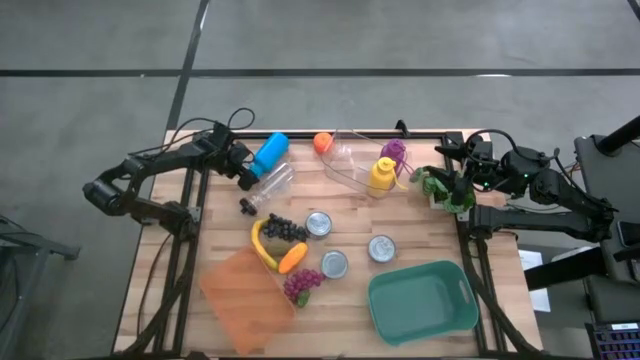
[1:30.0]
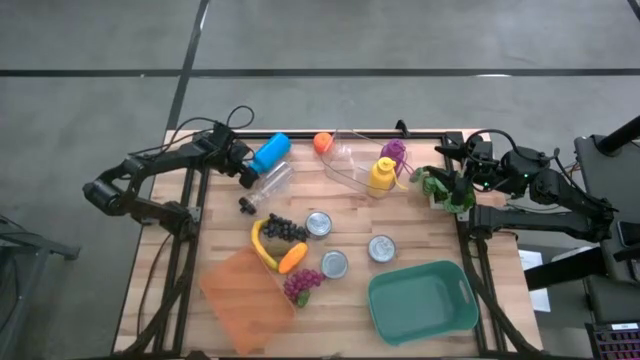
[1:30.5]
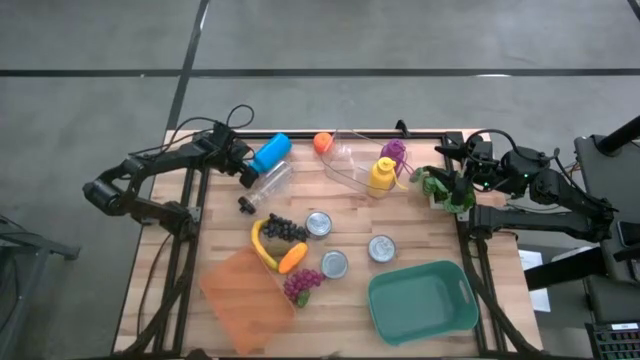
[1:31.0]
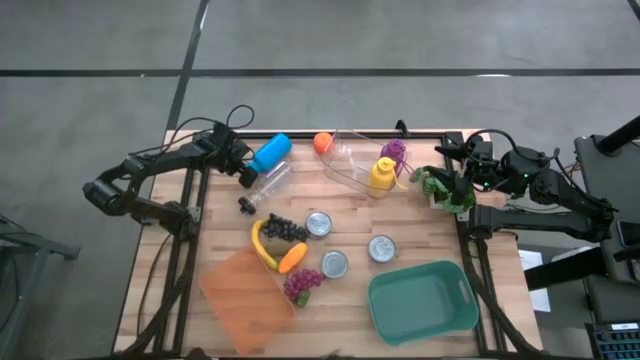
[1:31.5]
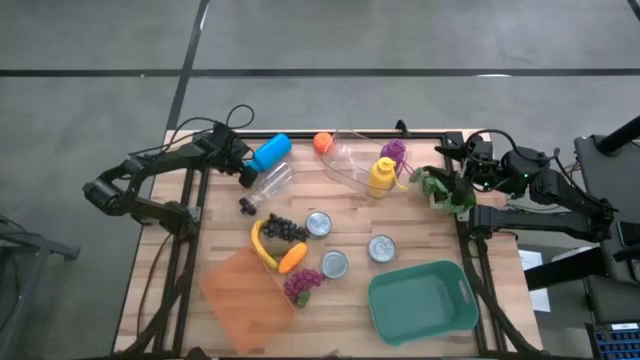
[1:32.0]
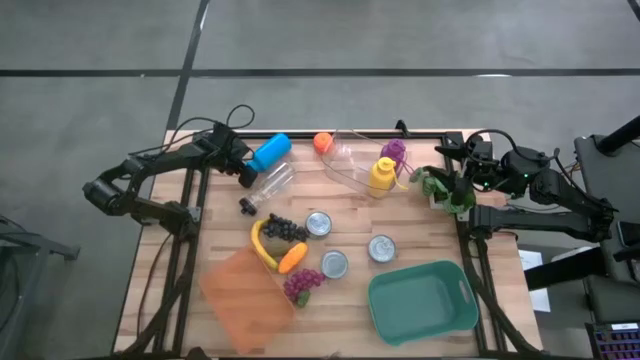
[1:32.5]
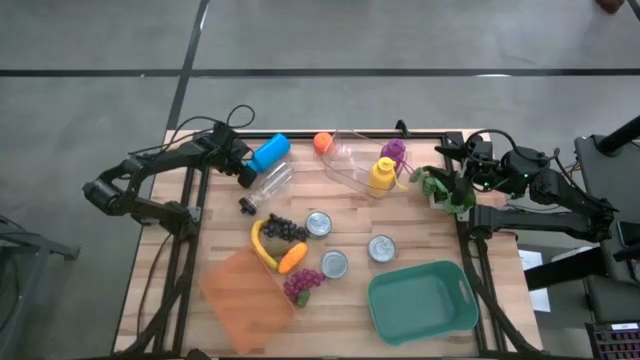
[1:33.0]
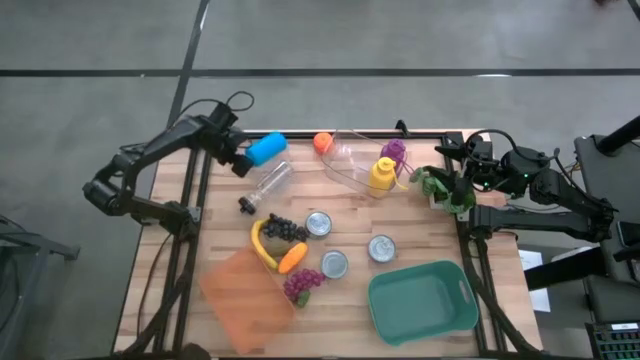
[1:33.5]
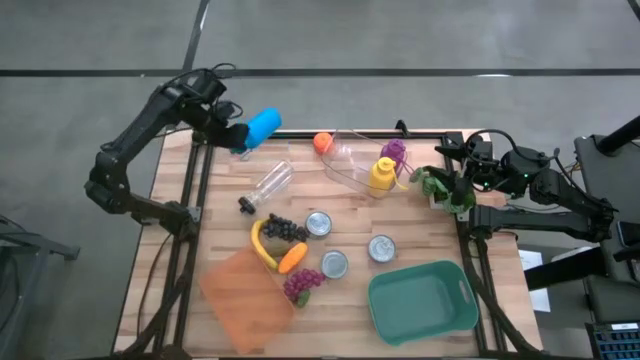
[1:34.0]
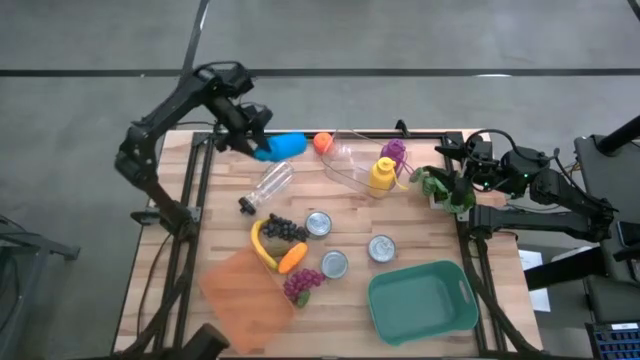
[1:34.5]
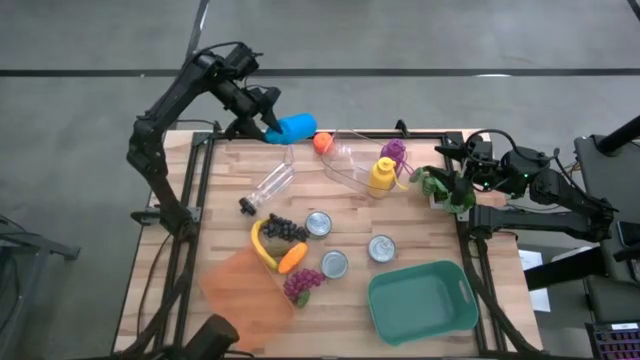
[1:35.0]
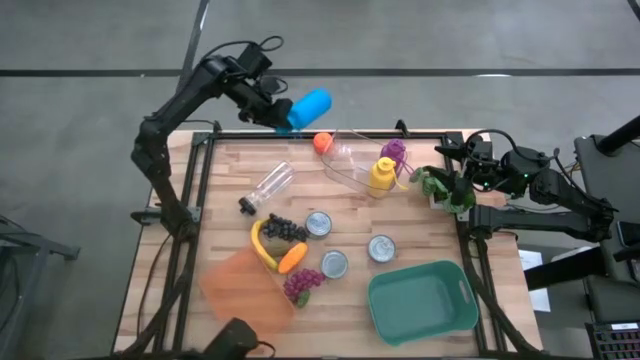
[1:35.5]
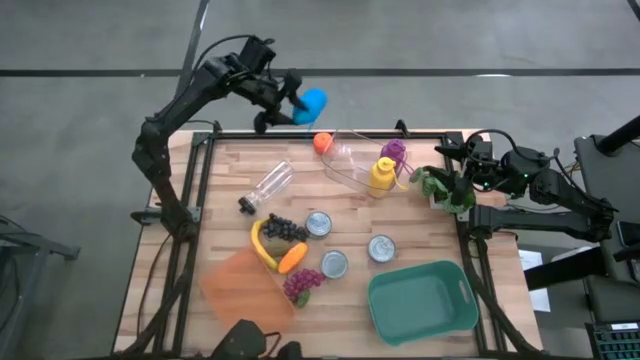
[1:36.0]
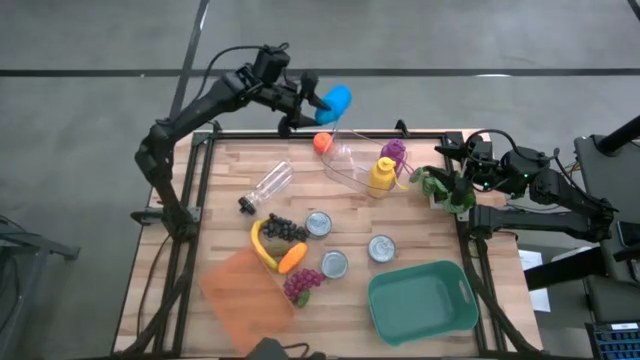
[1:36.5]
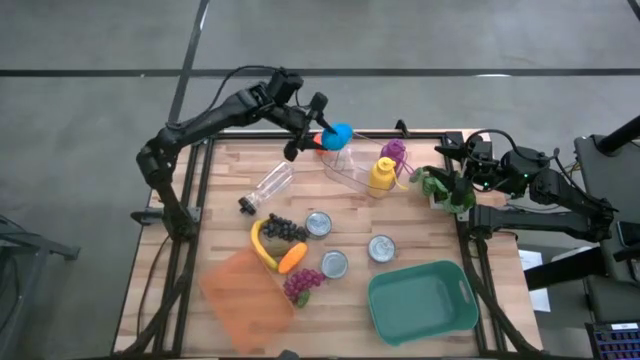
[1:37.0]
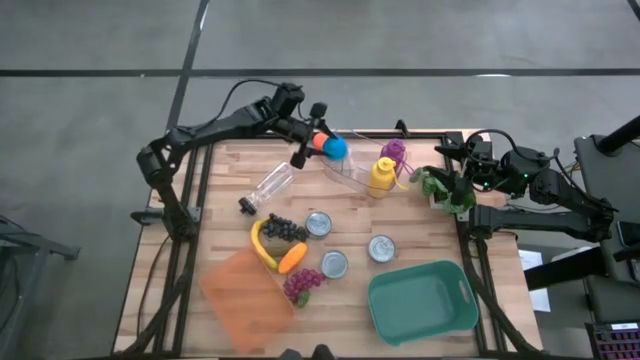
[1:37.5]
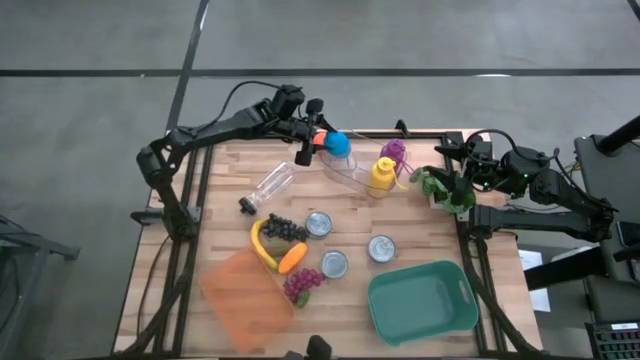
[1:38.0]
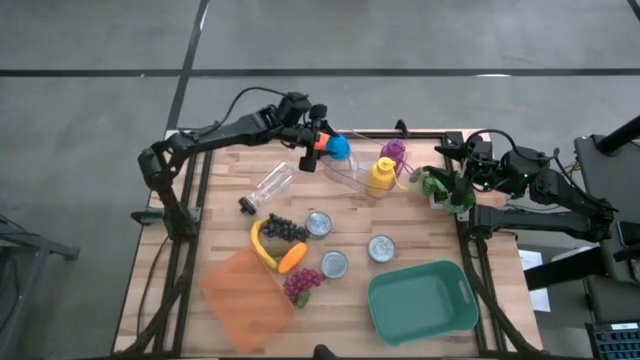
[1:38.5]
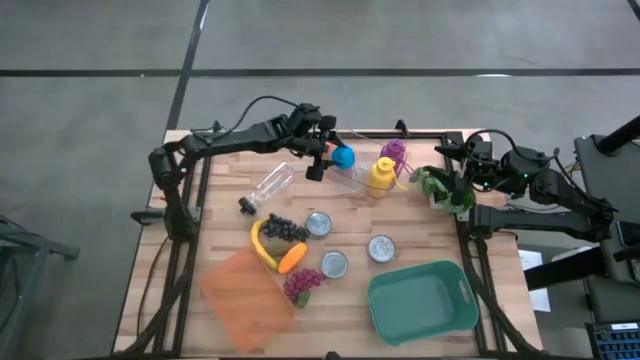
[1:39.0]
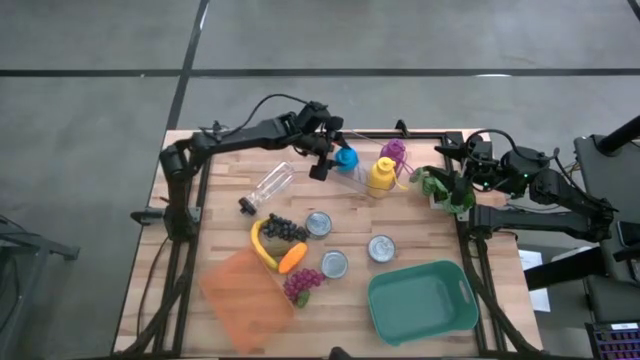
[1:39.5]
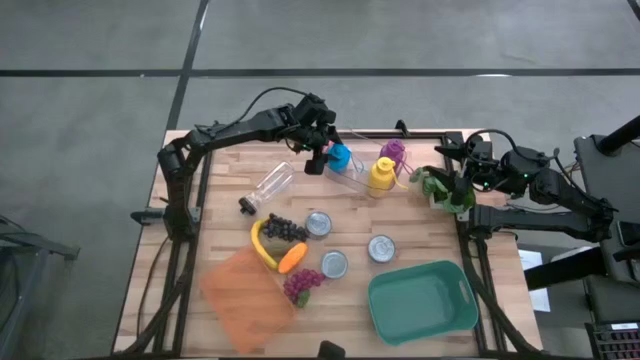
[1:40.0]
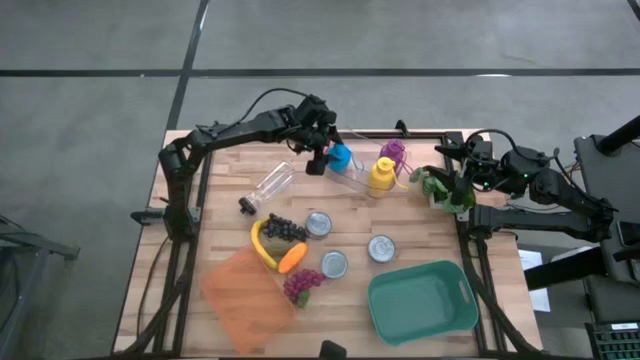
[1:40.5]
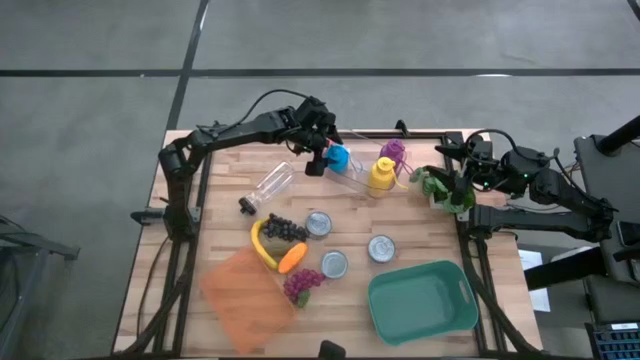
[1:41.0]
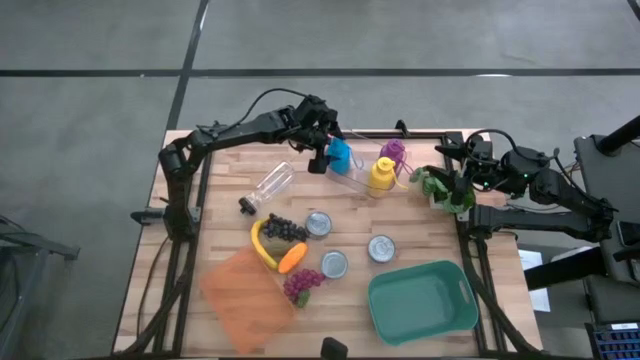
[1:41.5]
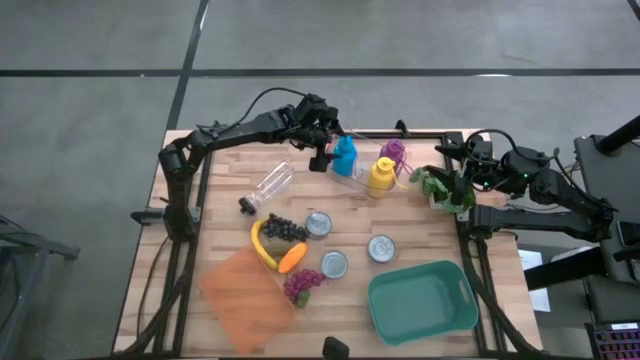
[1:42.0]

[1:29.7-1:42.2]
Task: Pick & Place Food Item
Put the blue water bottle into the transparent bin

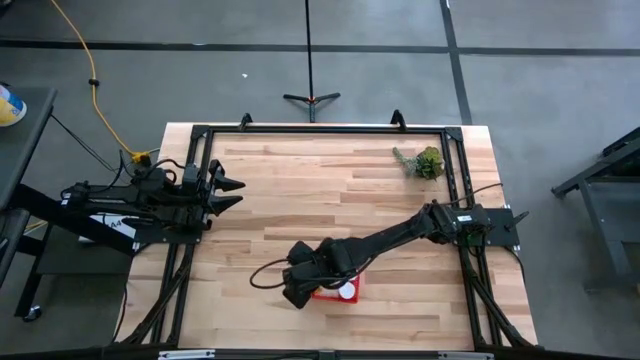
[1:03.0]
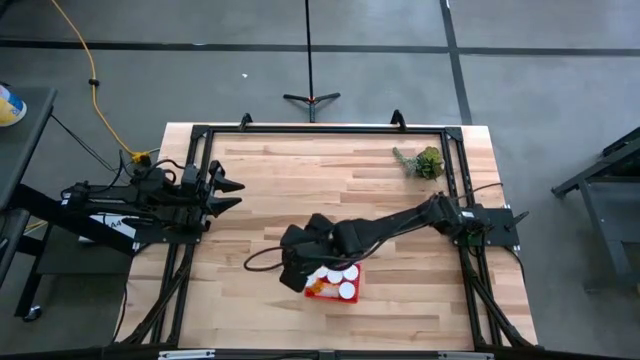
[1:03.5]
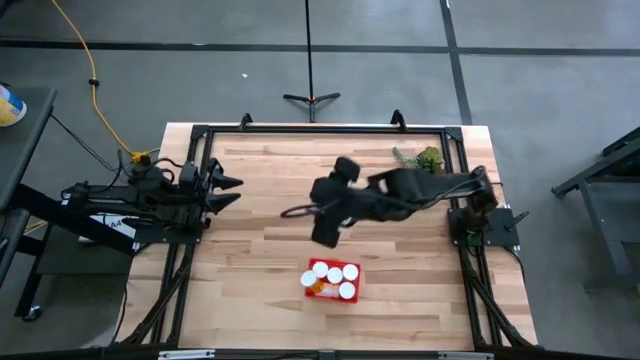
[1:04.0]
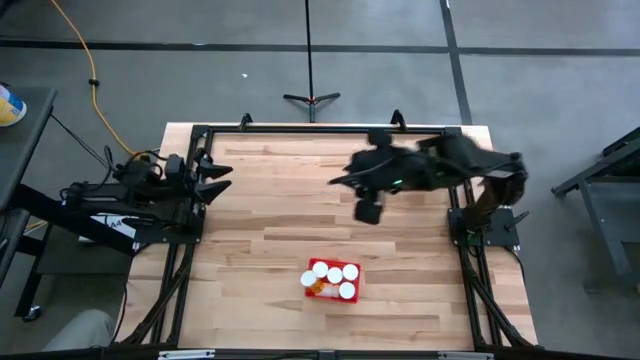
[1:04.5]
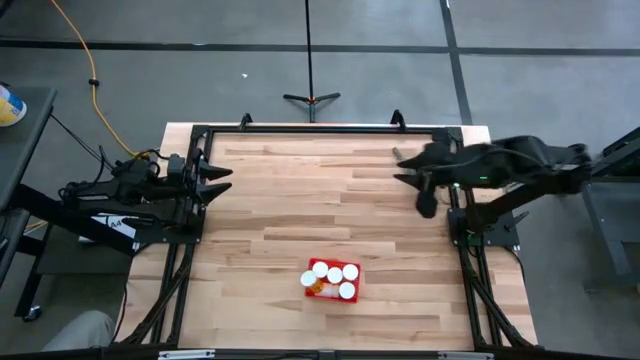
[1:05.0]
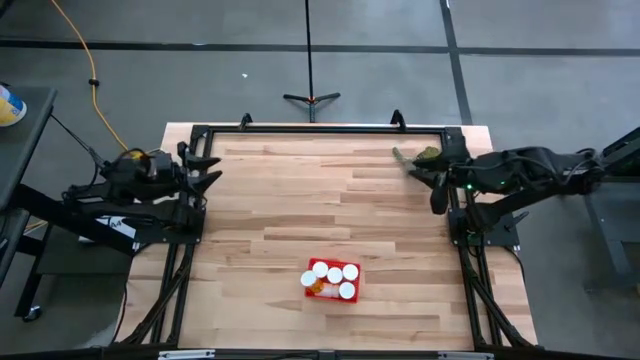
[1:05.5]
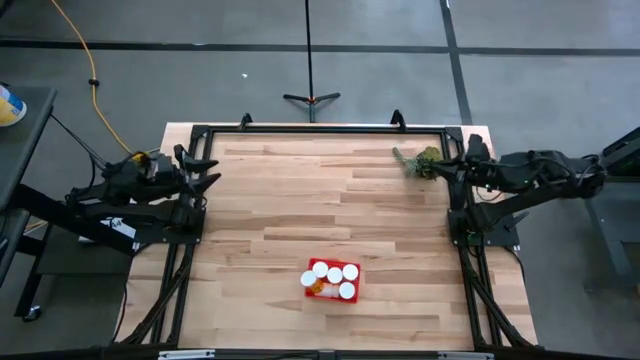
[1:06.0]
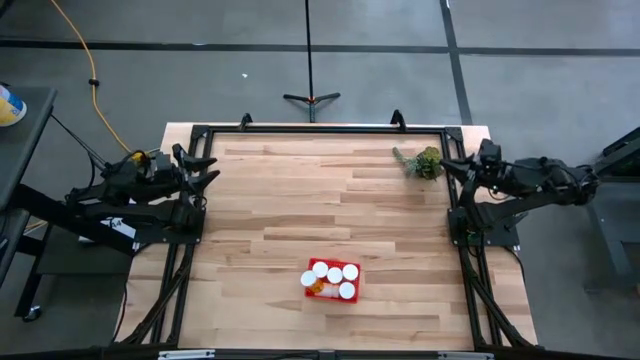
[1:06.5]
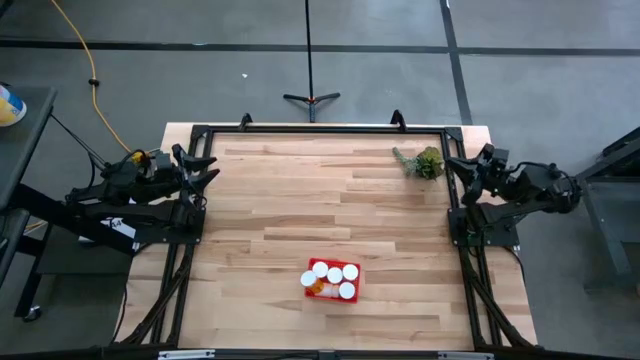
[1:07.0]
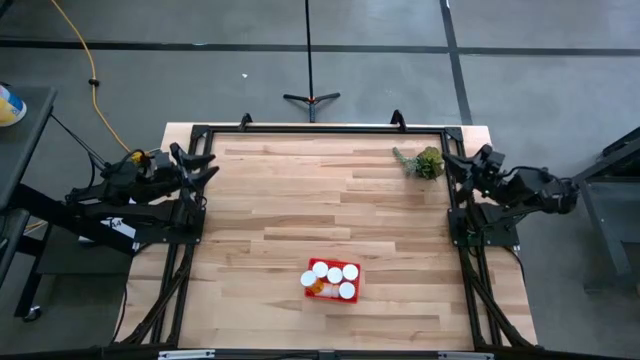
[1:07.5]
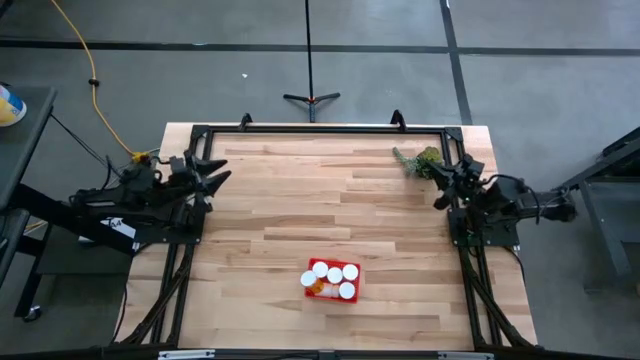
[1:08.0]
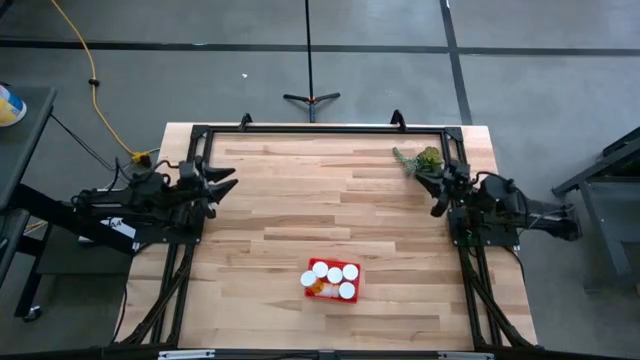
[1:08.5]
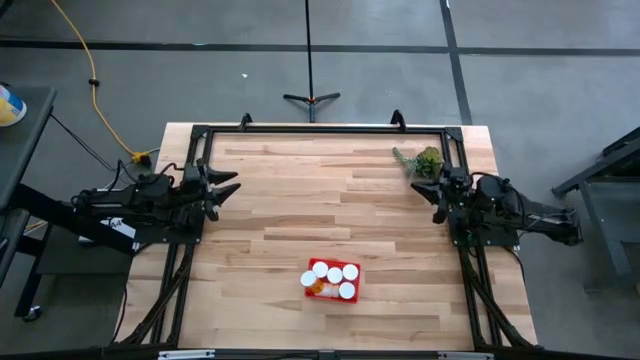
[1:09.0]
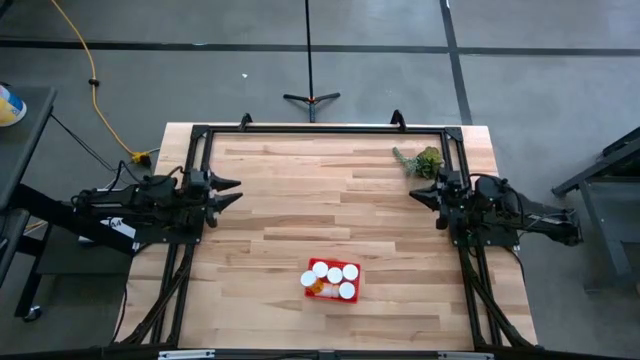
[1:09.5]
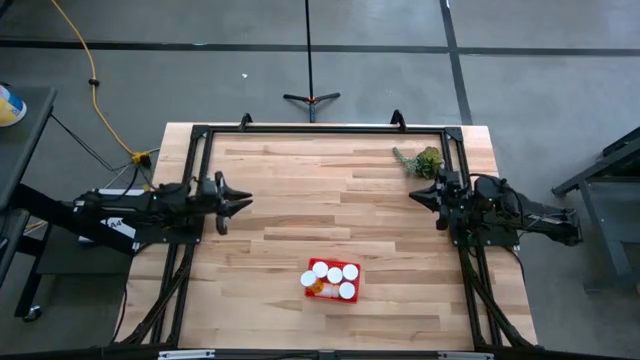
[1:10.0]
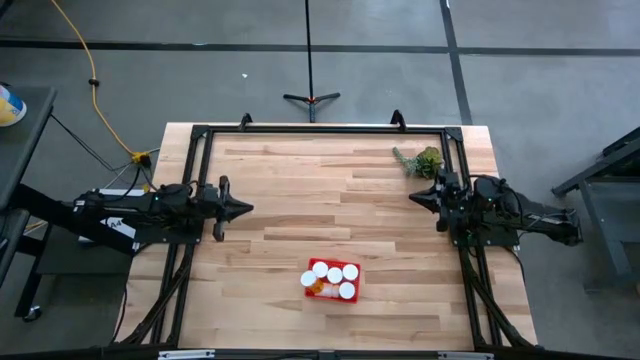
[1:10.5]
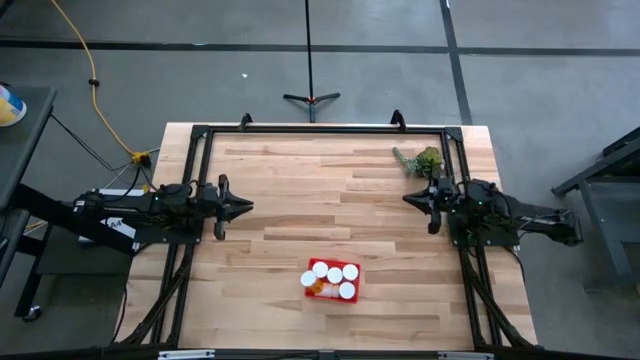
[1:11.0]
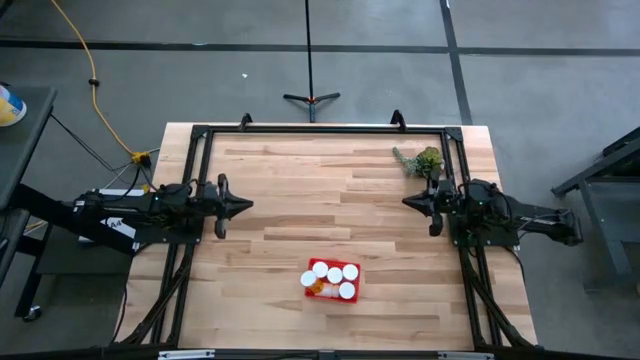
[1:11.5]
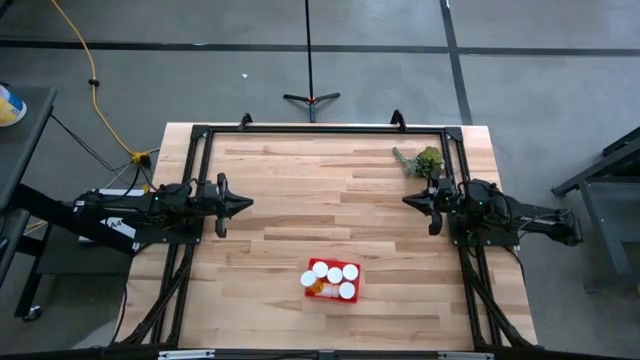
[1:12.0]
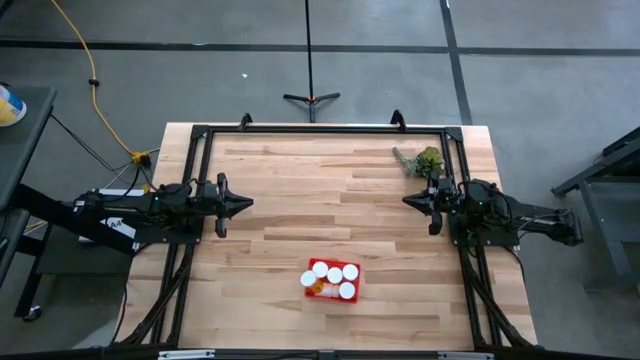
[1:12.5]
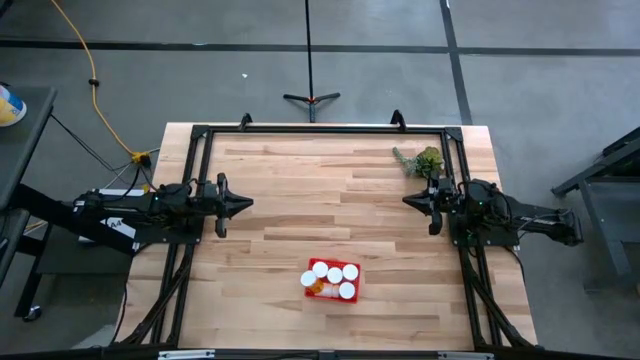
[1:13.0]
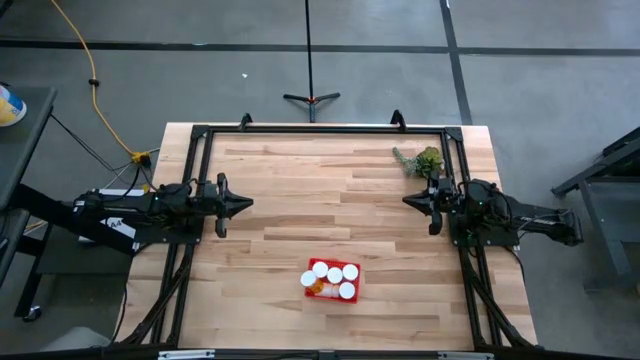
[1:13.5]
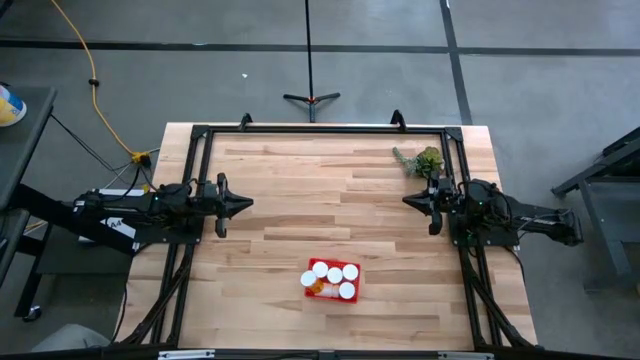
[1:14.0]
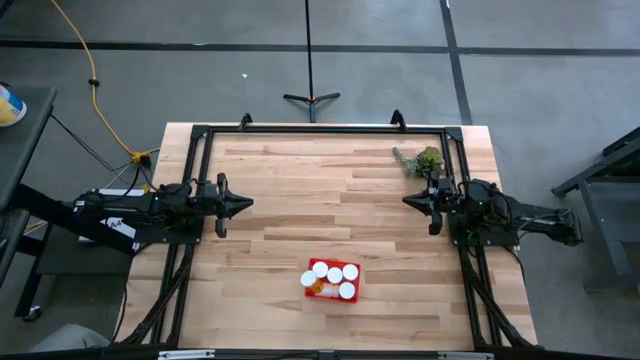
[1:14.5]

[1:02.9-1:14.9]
Task: Pick and place pill bottles into a basket
Return to Home Position
